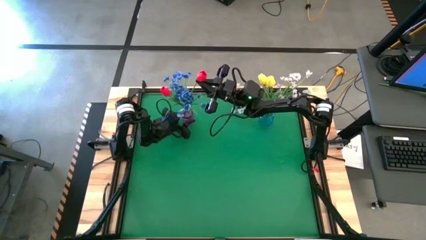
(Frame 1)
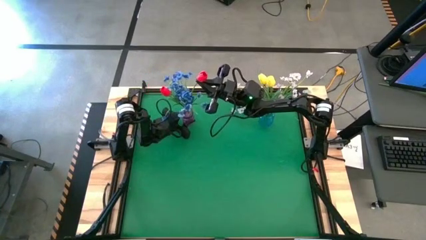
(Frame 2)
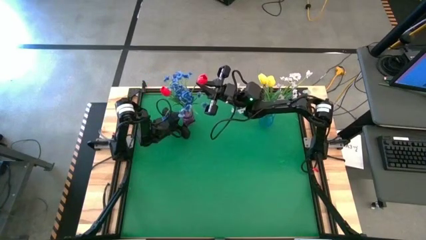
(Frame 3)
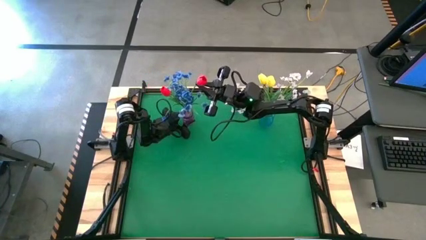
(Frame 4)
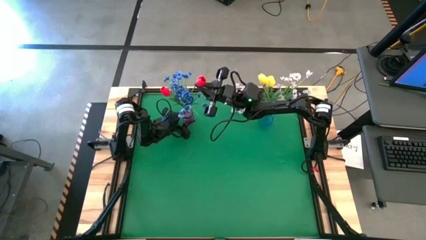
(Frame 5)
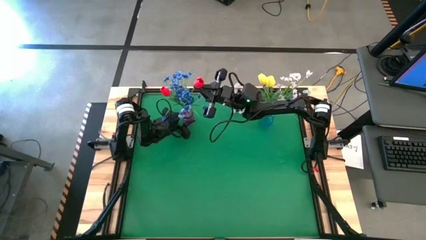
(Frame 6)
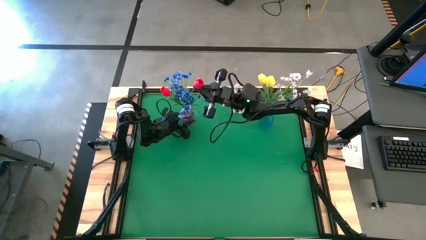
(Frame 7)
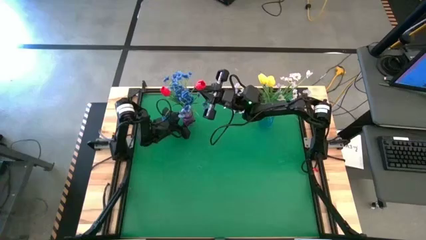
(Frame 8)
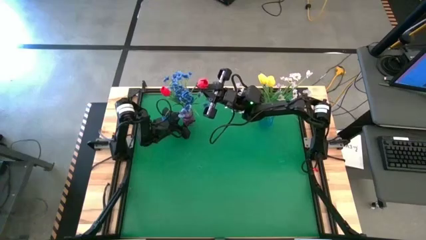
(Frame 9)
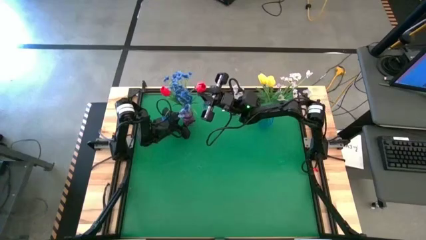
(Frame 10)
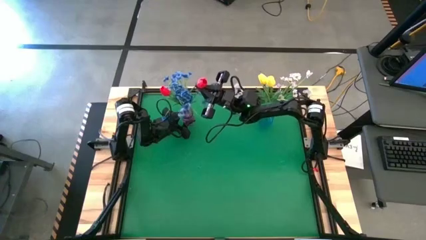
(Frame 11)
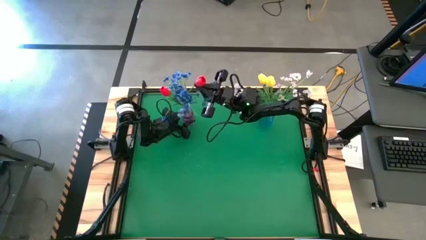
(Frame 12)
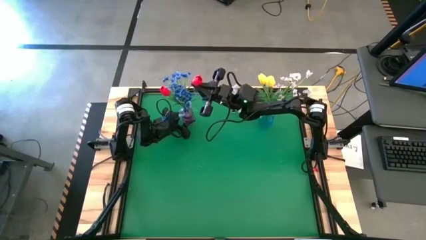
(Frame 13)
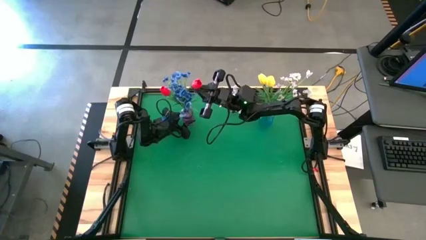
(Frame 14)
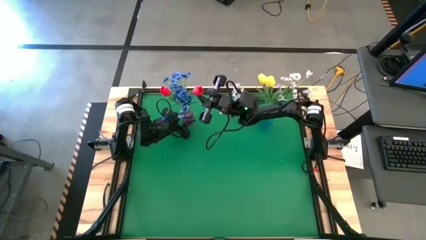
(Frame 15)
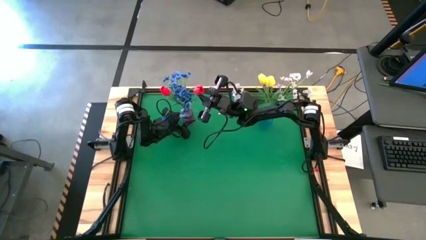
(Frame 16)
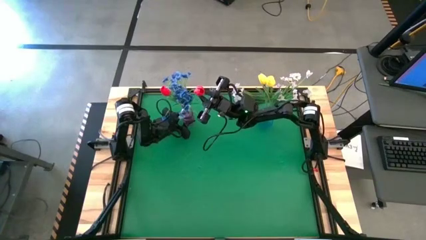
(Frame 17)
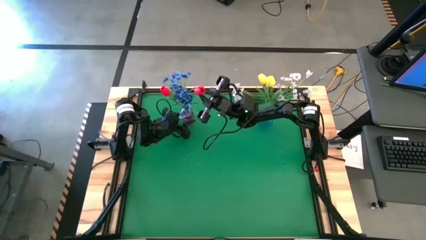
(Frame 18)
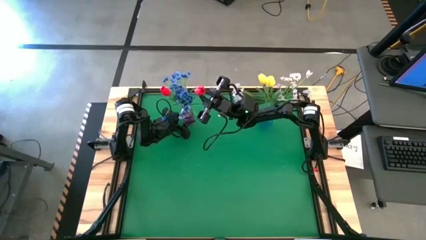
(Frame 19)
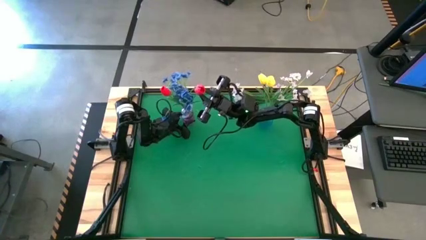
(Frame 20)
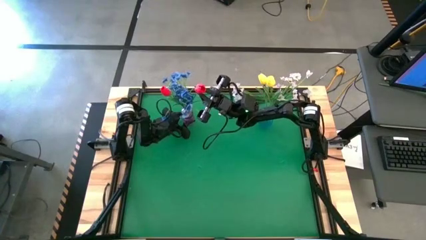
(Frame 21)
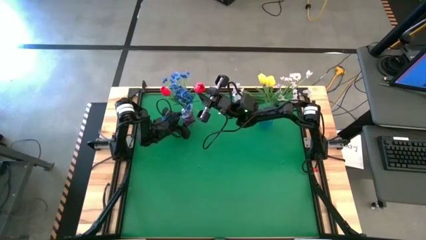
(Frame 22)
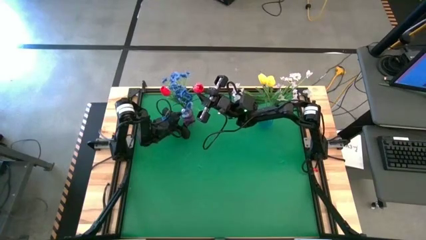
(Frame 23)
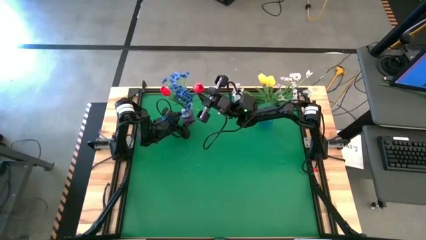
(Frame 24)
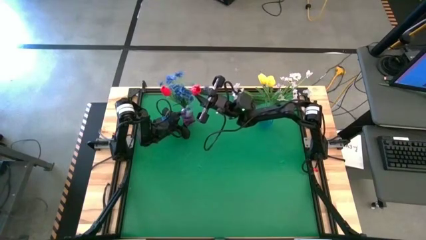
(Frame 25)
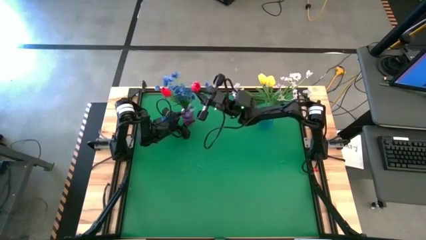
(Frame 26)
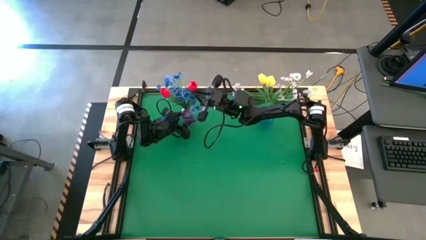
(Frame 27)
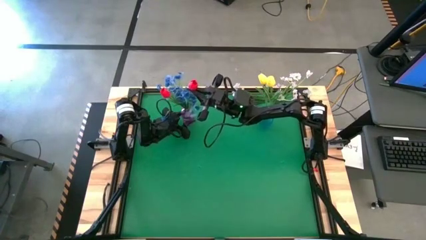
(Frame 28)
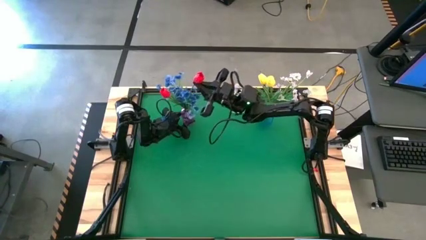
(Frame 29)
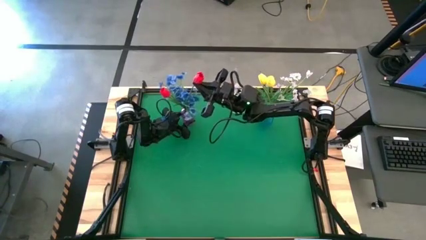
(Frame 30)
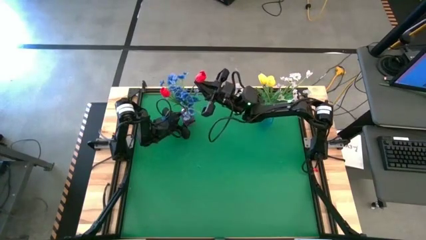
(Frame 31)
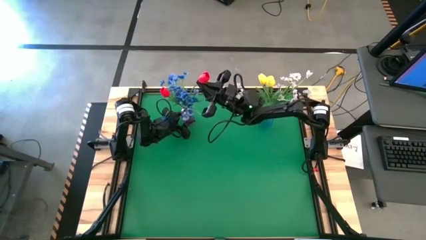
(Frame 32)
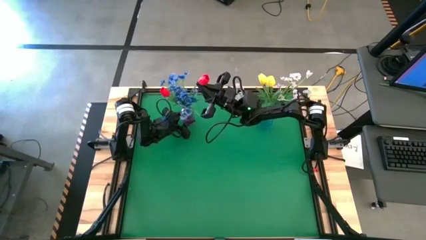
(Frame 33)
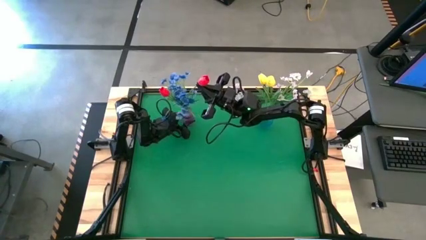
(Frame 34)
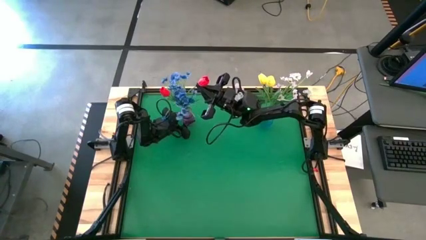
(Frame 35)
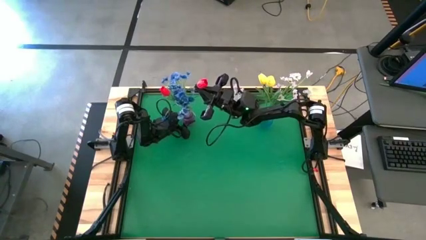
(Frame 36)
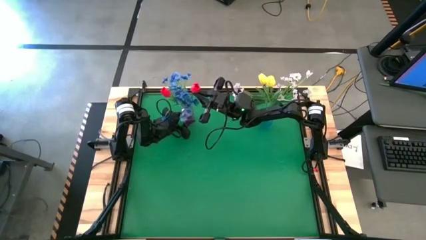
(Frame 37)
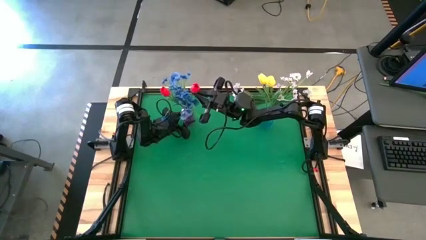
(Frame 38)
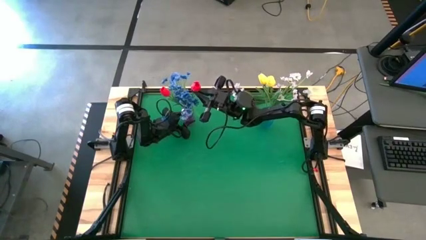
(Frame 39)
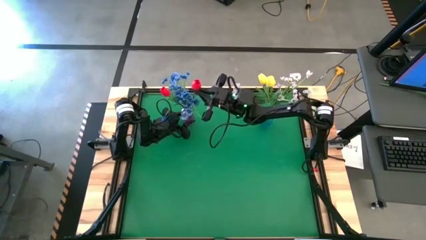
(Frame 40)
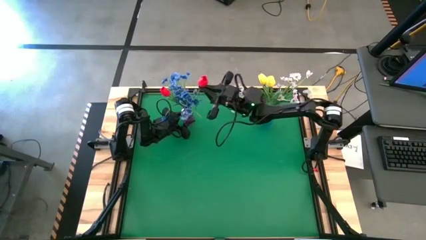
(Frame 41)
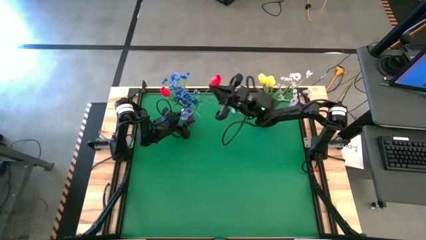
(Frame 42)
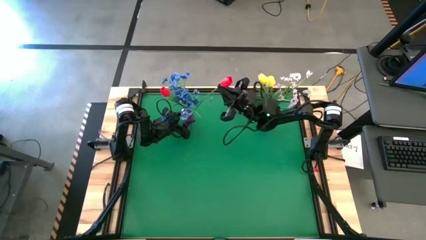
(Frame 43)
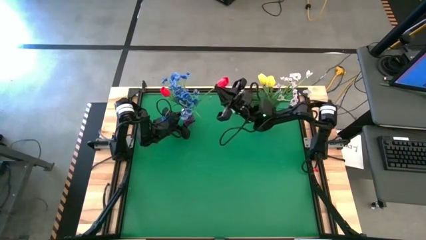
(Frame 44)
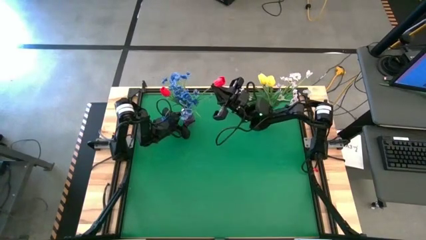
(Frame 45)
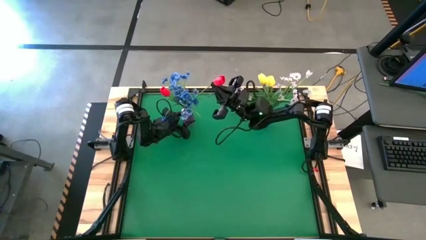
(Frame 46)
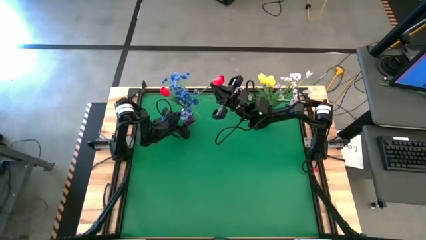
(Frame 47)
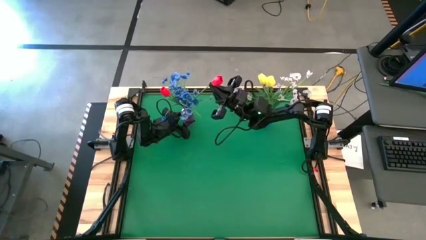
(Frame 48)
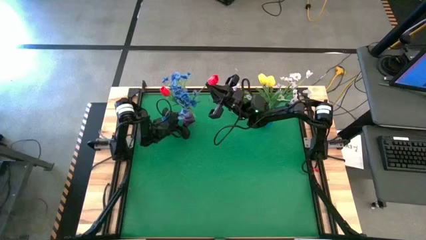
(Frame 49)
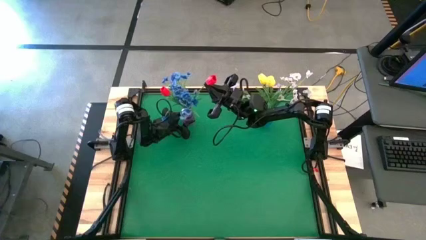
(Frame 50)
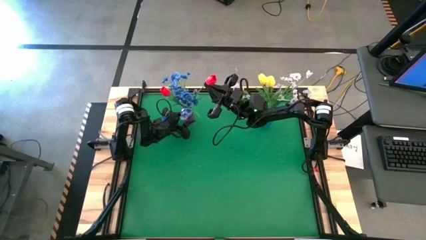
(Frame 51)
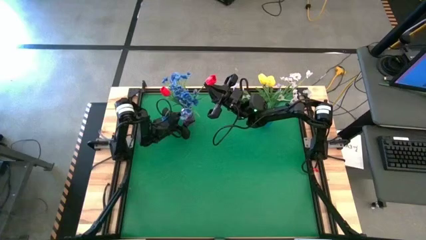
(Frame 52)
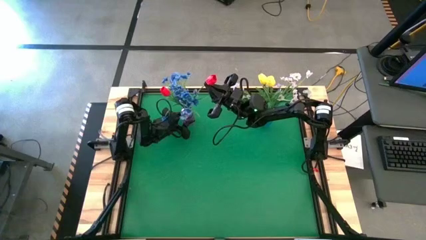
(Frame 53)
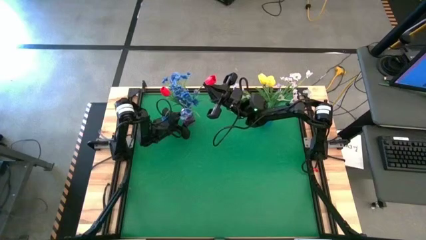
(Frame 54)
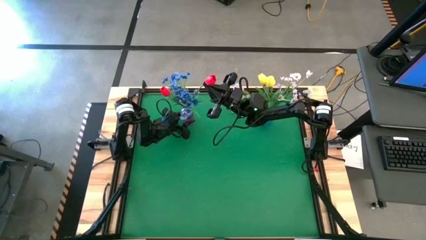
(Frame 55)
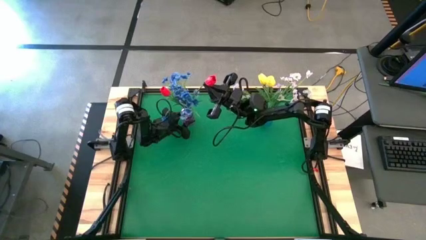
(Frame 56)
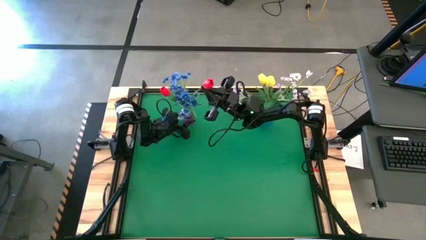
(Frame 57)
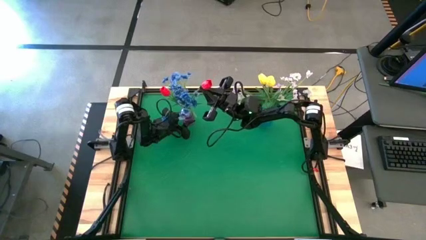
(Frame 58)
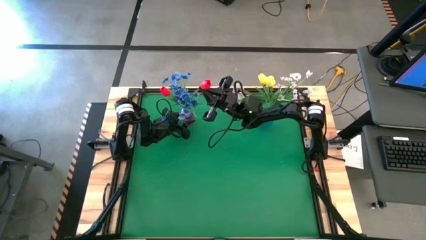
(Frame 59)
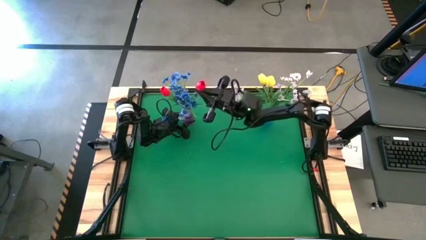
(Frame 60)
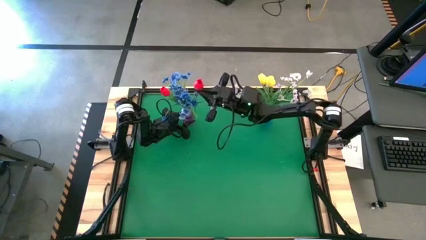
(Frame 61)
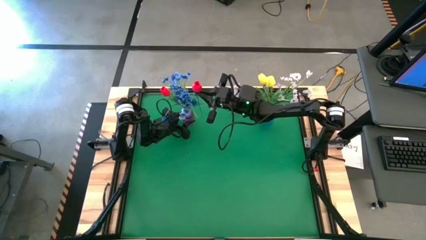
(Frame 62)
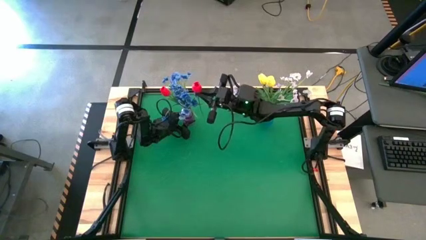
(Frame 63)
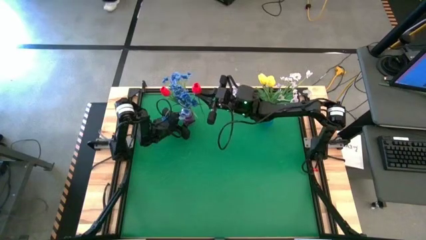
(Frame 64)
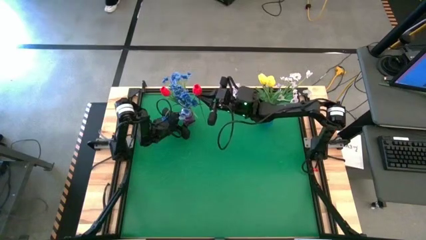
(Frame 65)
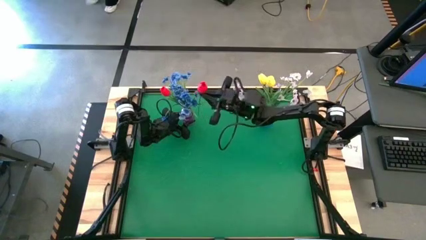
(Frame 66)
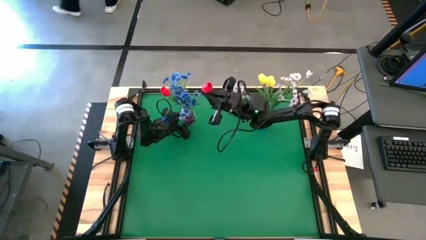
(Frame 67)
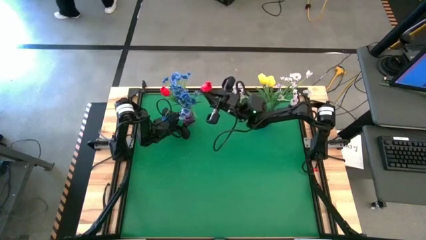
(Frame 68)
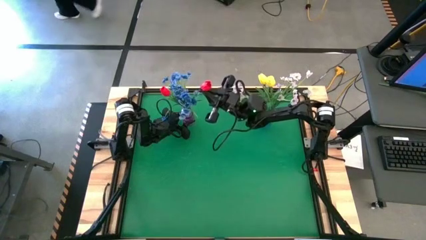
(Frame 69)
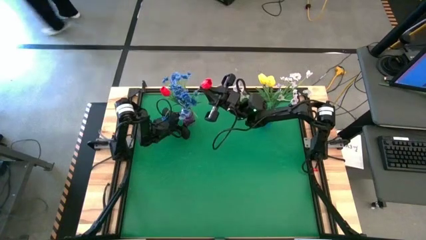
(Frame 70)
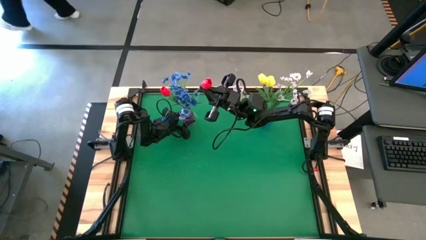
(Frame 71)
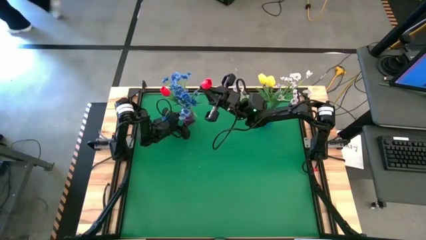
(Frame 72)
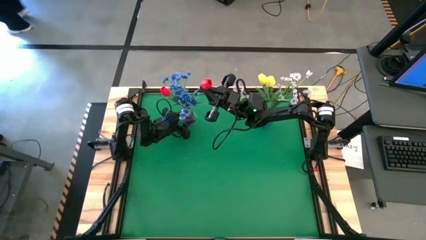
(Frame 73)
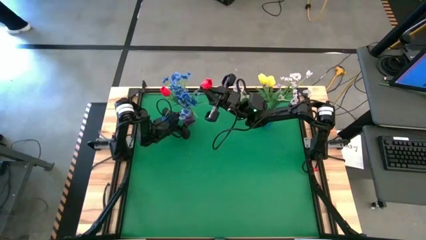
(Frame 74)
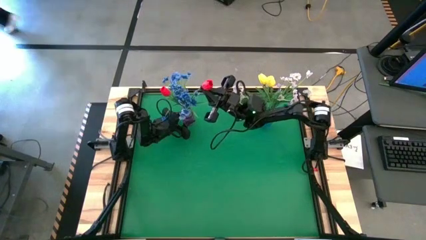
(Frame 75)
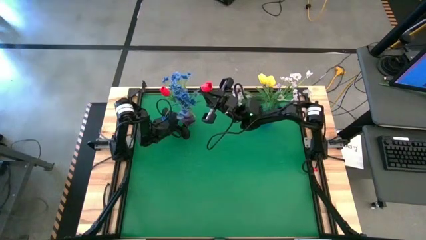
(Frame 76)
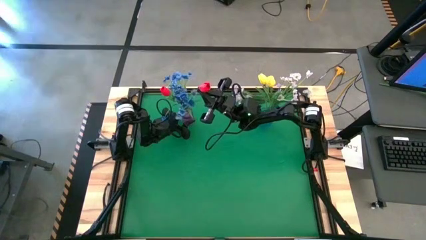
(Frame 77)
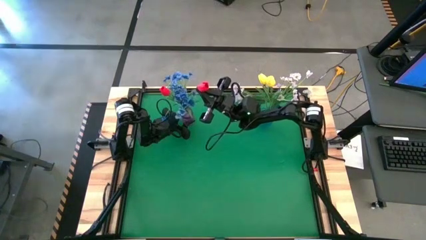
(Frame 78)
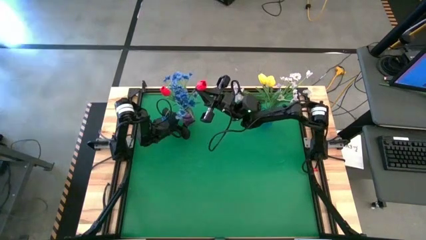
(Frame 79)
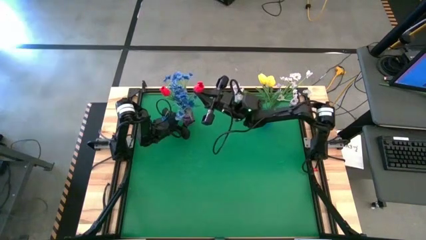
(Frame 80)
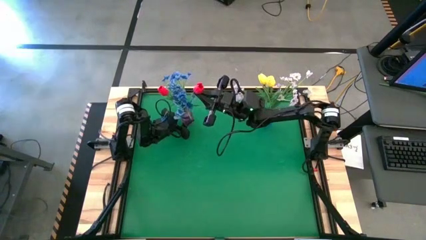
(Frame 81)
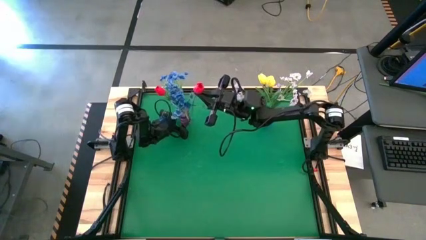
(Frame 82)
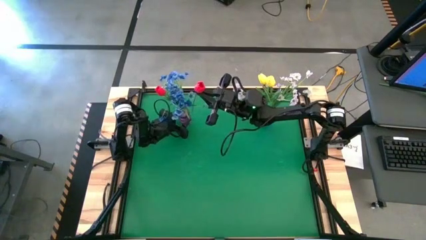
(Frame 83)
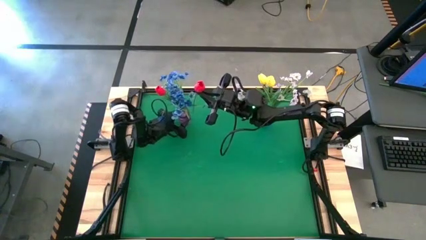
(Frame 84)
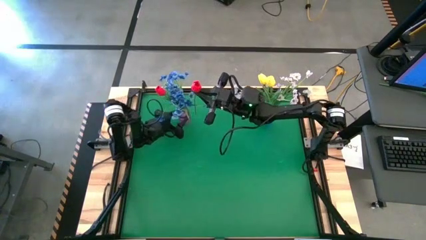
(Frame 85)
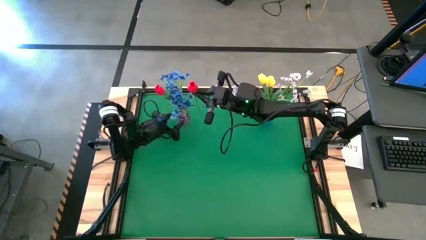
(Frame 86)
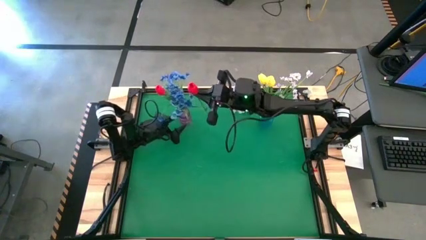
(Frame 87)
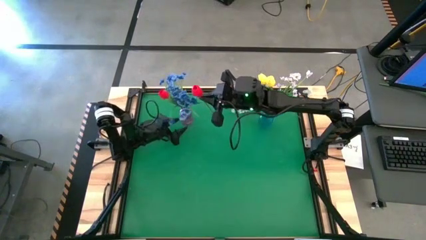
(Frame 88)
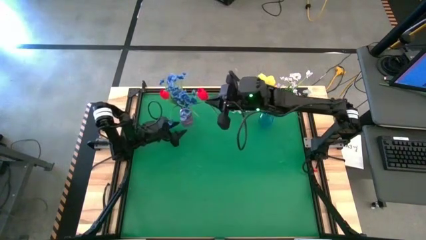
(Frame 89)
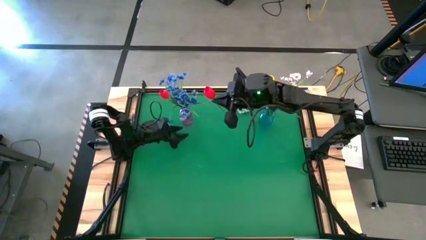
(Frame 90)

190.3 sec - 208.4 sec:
Task: Sort flowers into vase by color
Put the red tulip into the purple vase
